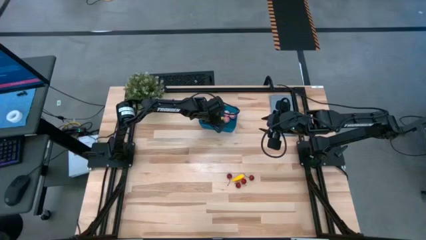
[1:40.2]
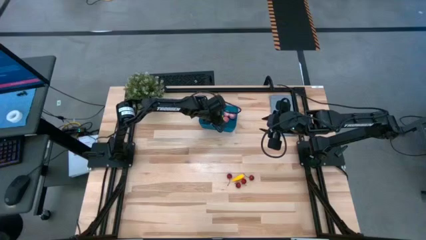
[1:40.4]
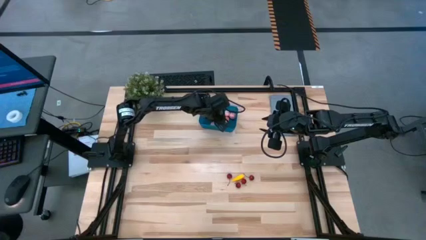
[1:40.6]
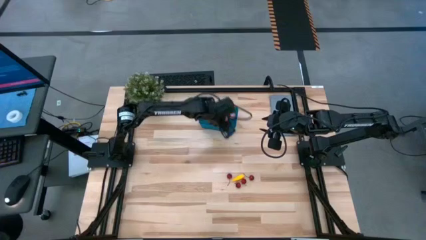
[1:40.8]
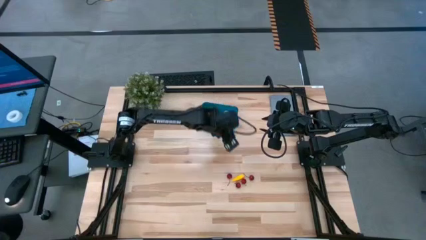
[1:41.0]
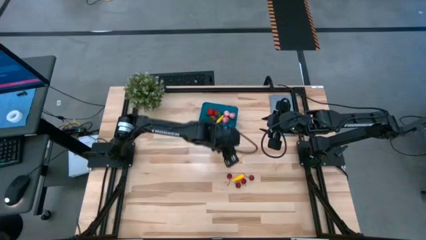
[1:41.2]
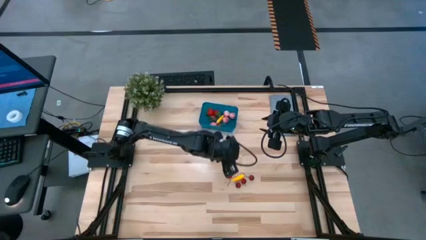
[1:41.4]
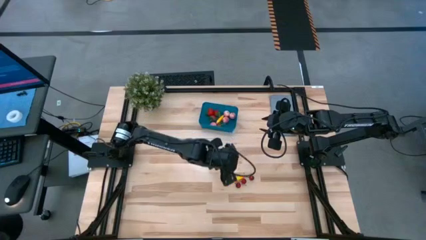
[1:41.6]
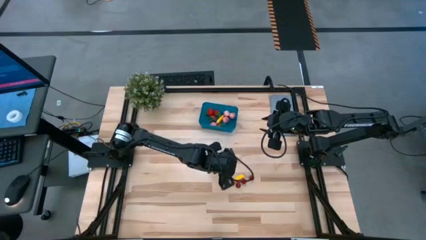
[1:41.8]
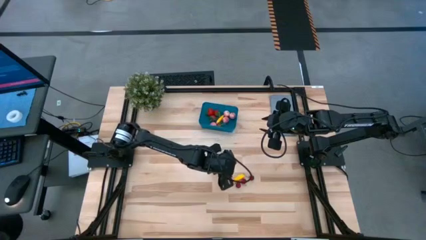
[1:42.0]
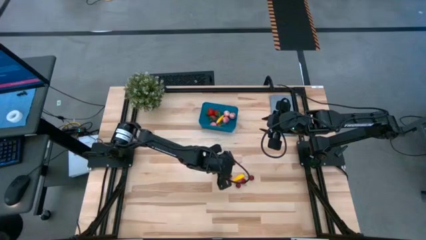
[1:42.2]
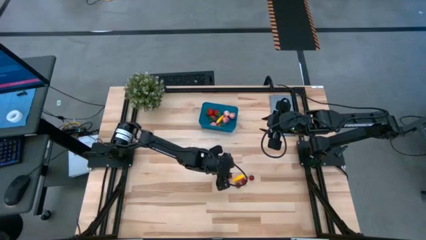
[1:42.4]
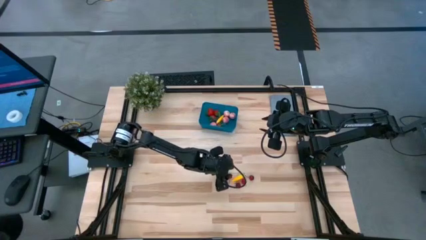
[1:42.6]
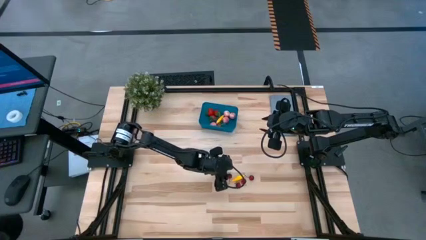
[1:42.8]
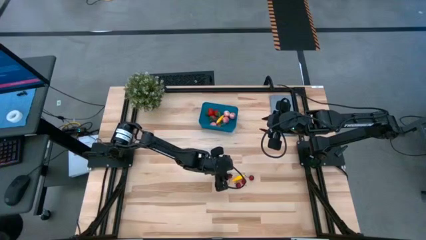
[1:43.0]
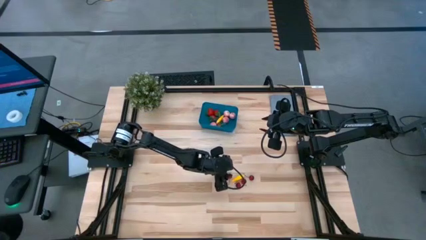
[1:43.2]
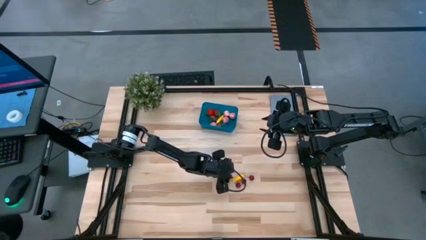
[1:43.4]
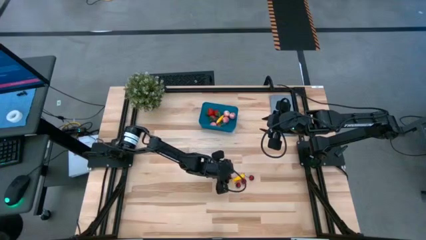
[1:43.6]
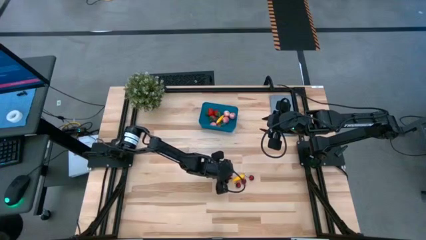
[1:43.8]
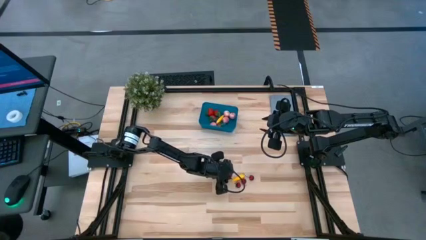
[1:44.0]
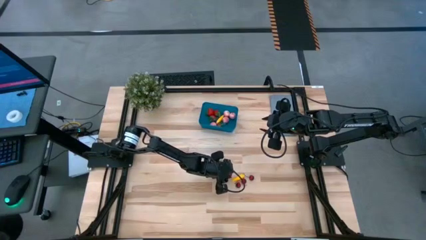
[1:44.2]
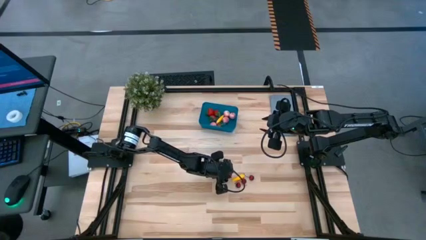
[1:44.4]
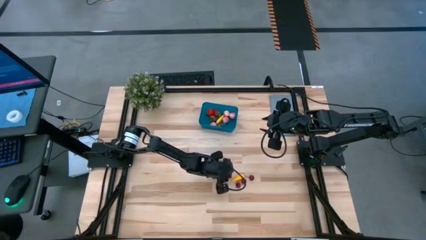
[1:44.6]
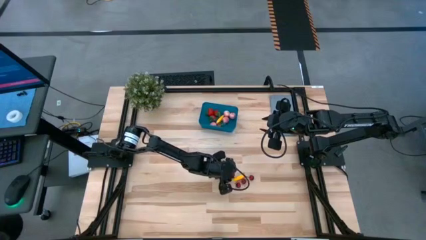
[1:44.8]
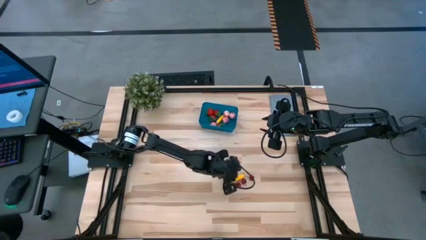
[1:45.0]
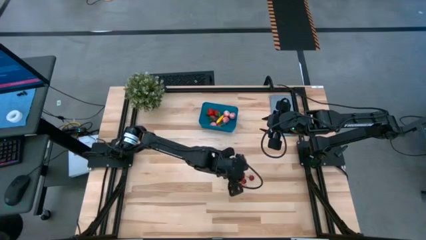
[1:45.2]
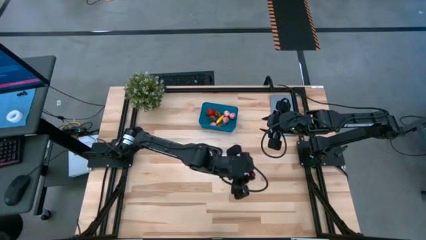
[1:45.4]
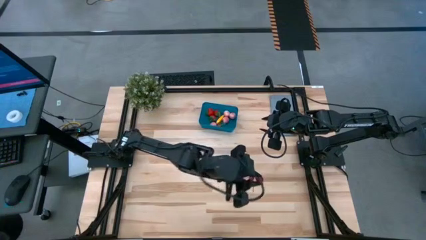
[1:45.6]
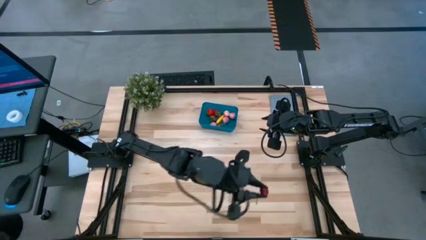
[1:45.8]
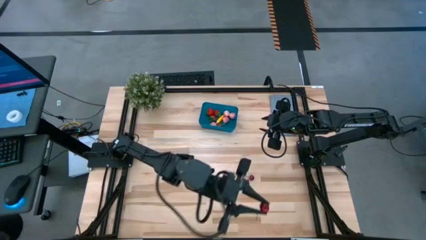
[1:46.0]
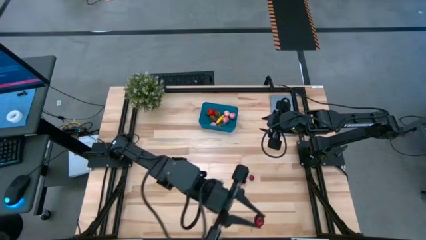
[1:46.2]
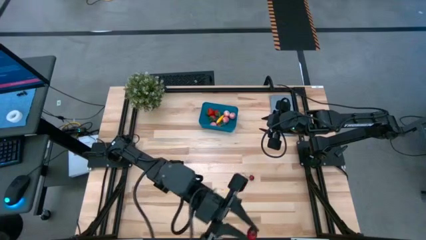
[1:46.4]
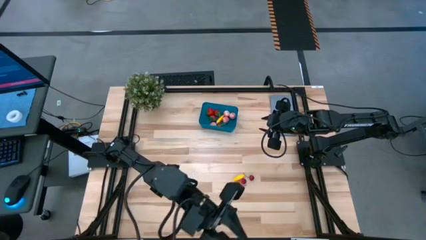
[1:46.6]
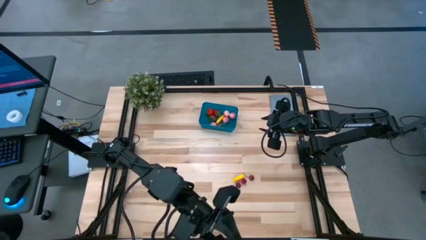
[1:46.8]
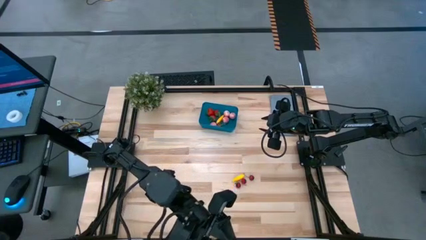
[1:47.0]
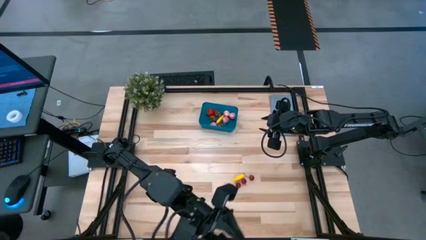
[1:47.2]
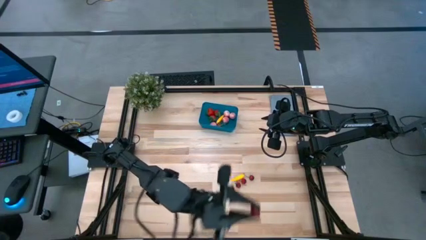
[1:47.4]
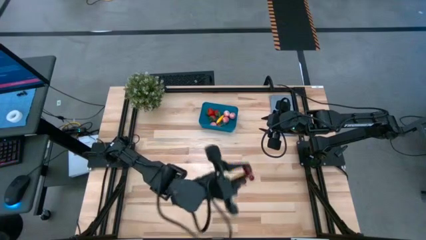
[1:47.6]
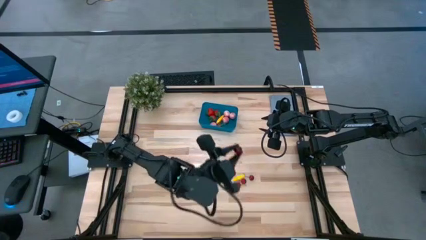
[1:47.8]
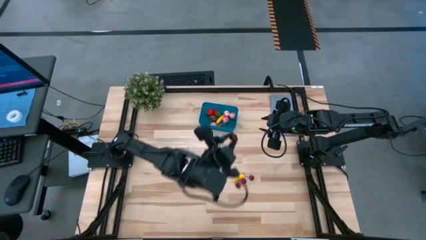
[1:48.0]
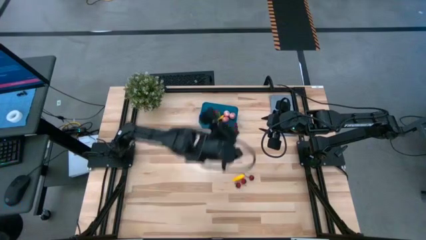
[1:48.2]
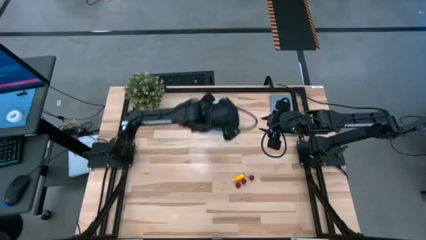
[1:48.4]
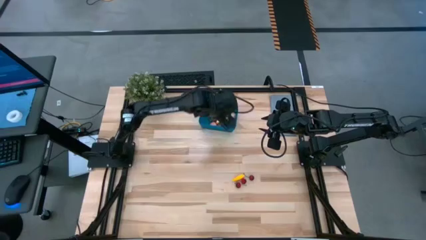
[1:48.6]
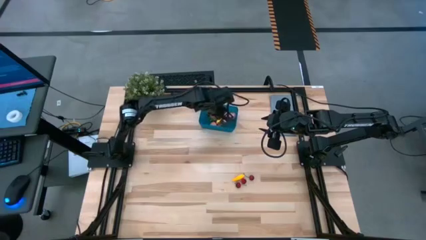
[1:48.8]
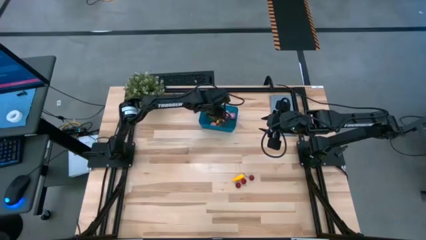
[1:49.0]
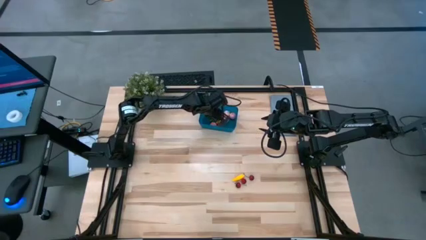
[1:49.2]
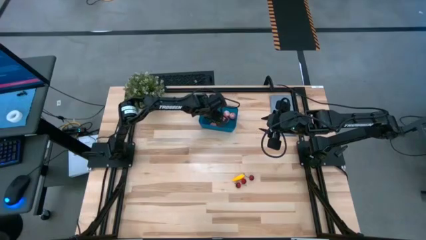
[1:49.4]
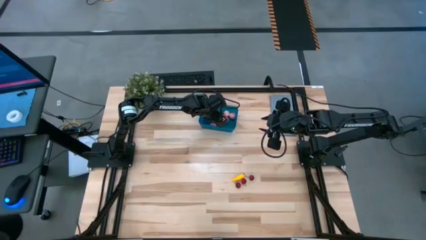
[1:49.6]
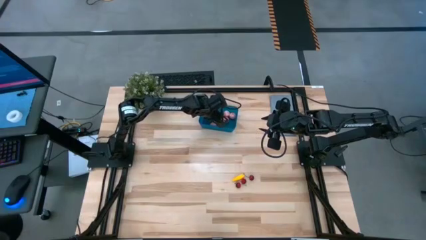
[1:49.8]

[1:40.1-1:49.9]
Task: Pick and placing Produce into tupperware
Put the cherry into the blue bin

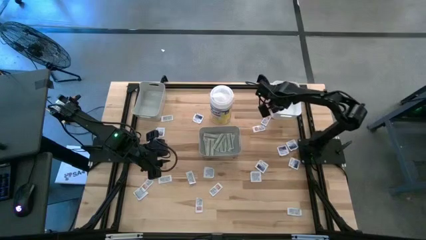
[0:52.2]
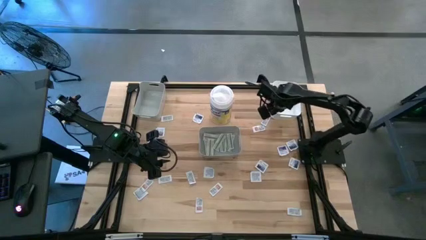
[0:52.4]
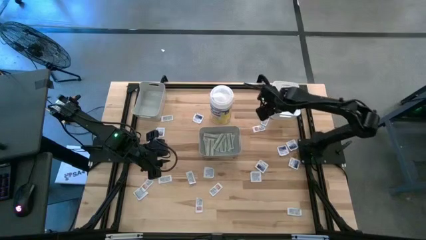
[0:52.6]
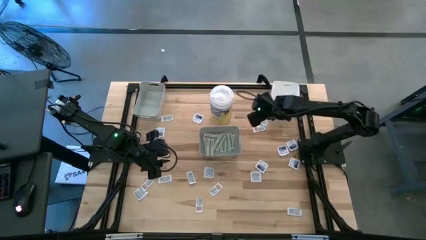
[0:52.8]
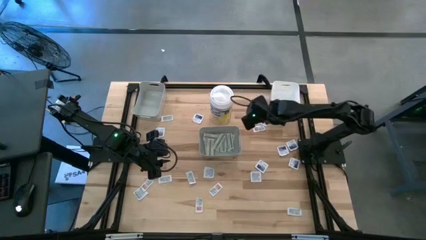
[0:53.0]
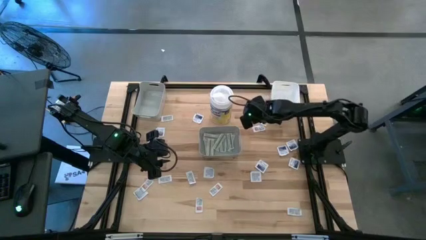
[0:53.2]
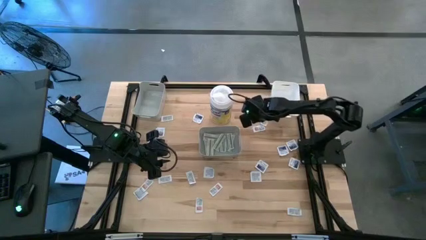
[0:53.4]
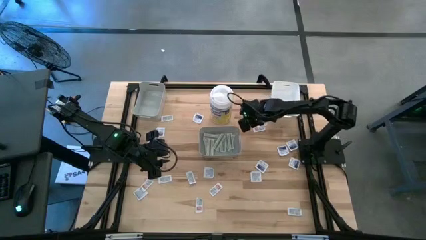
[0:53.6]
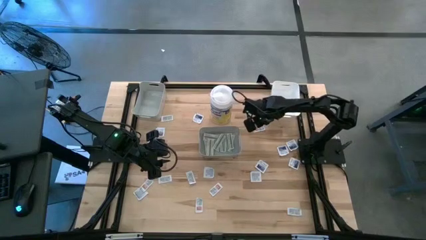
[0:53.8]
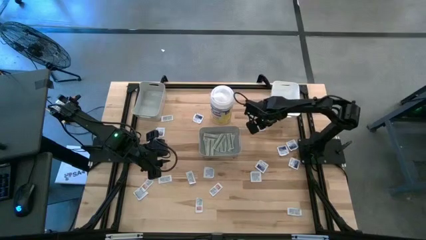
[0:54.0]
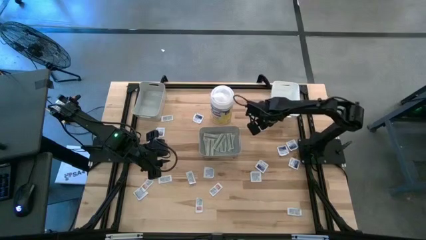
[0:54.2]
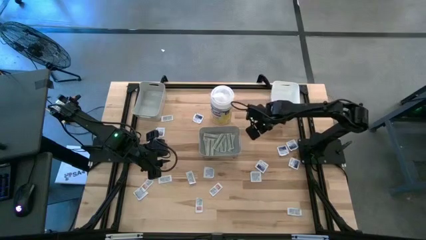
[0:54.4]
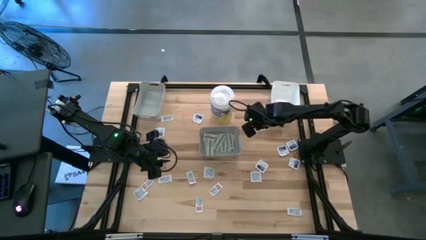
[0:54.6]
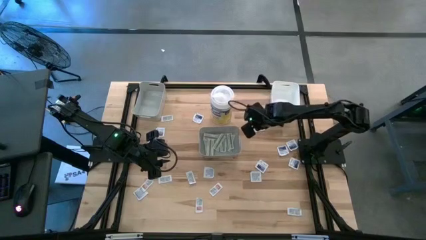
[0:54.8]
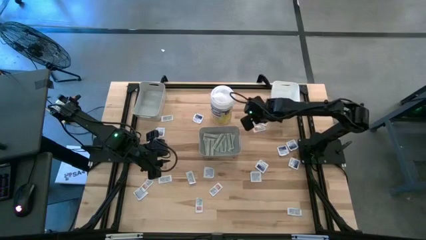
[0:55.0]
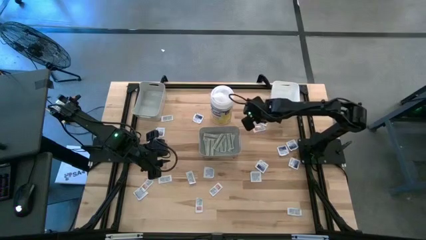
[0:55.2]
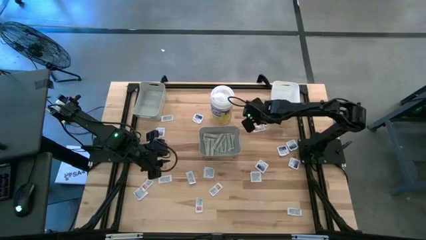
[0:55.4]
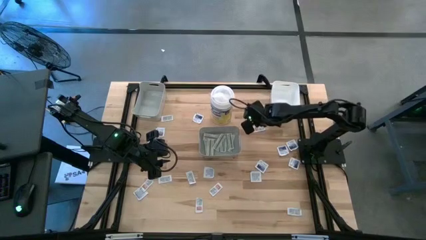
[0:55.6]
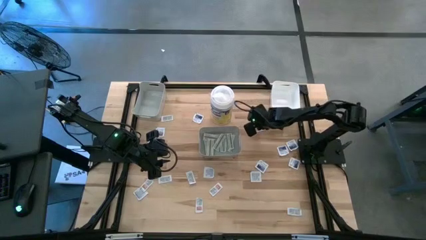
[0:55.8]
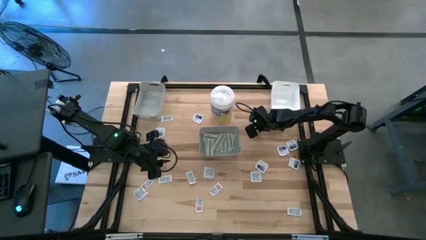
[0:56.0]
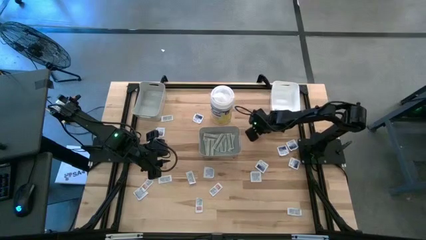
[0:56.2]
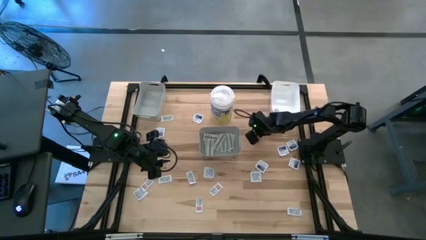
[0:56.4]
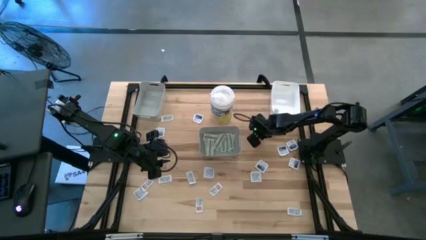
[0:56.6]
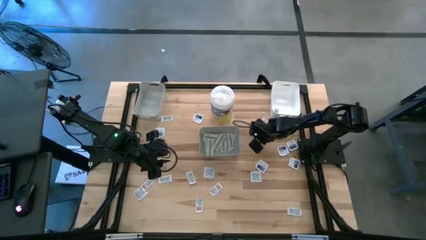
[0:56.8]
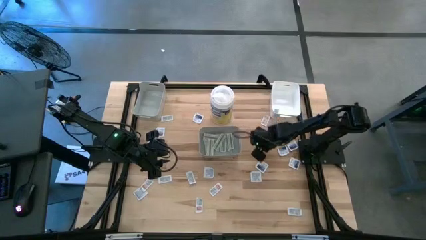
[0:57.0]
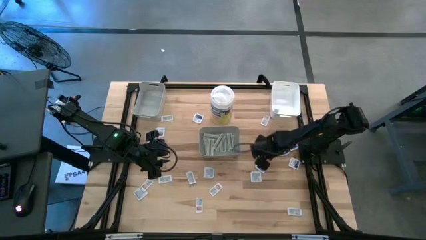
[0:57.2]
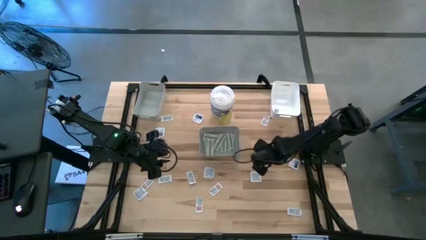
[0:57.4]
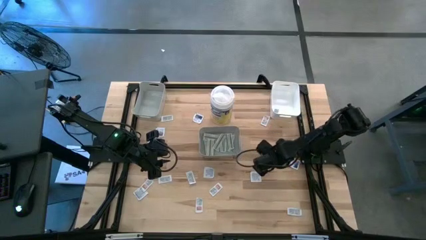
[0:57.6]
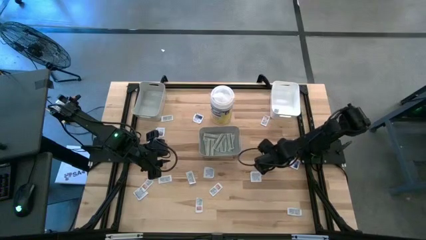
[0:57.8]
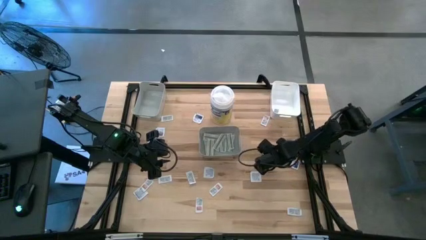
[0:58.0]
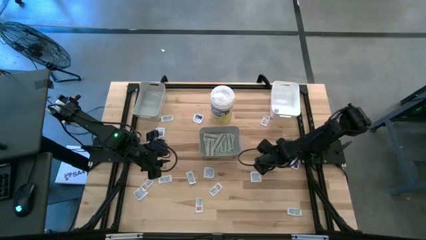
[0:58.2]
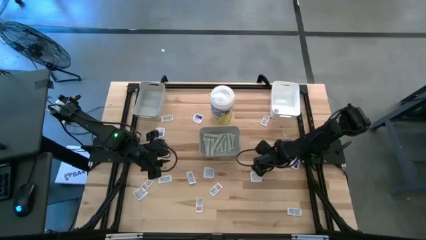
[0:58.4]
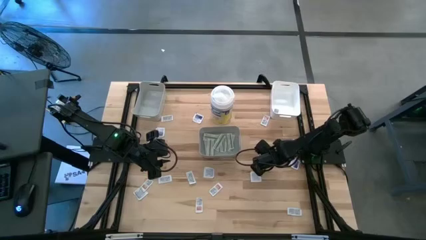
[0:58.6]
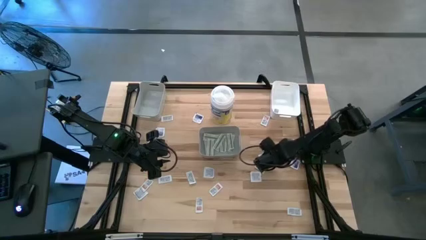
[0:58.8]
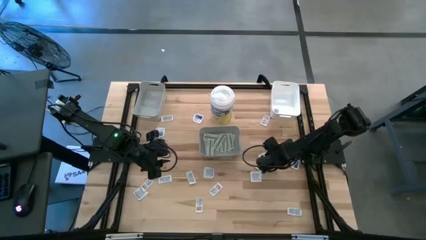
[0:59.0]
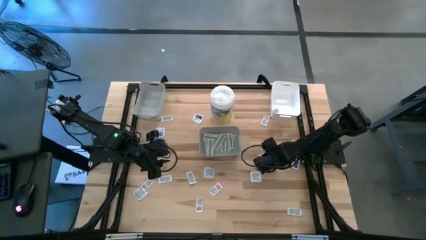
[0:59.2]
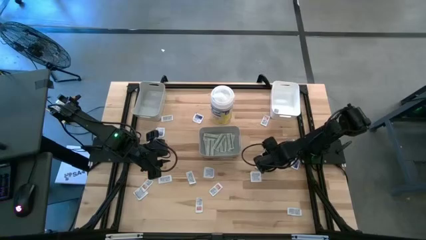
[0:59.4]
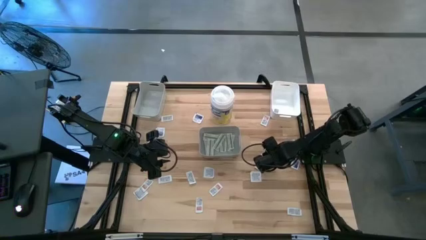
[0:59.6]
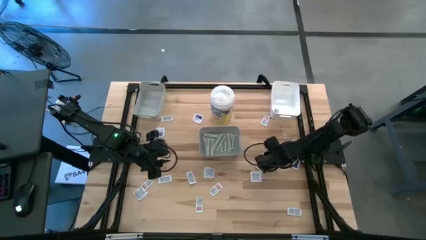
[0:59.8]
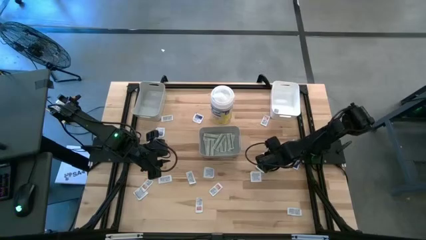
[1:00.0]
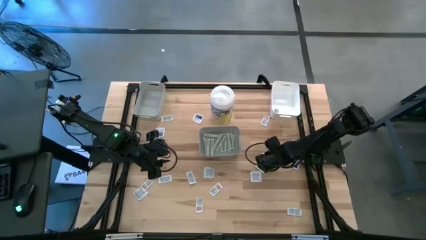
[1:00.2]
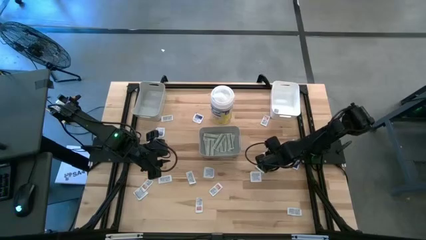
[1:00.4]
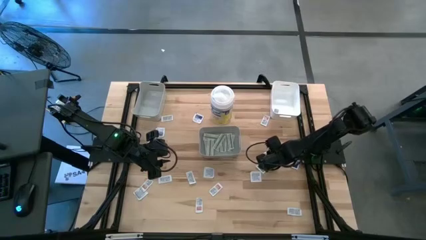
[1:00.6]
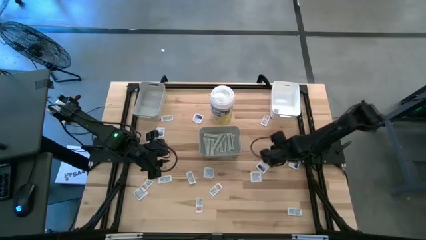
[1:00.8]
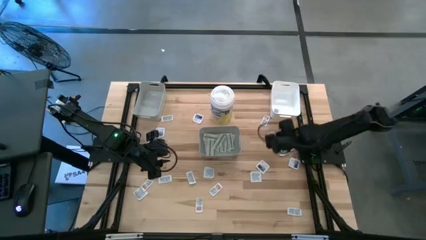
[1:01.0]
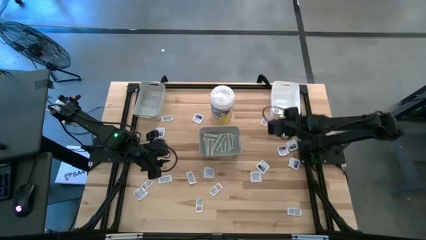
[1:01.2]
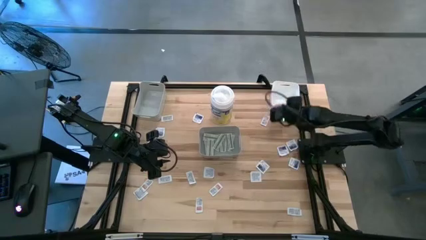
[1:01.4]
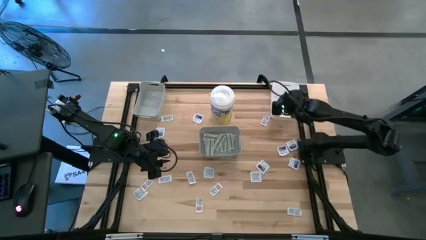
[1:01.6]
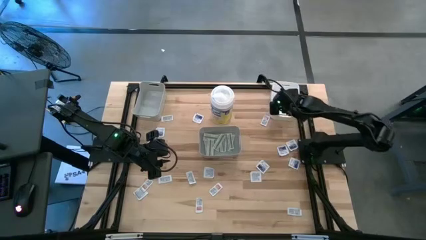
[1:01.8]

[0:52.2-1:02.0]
Task: Pick & Place First Aid Supplies
Put the ointment pad into the white bin
